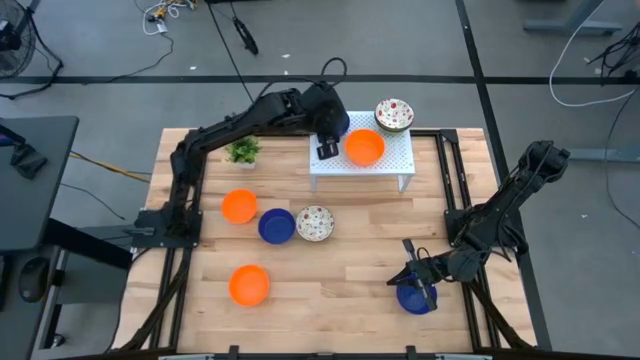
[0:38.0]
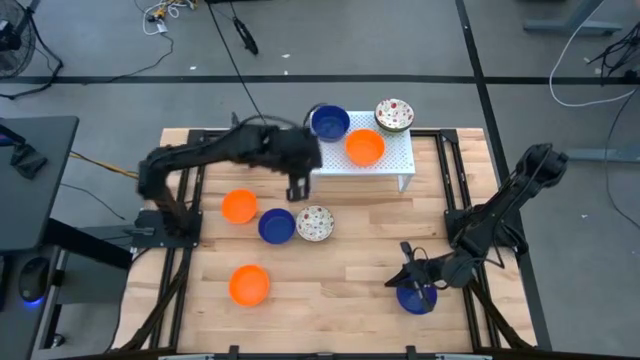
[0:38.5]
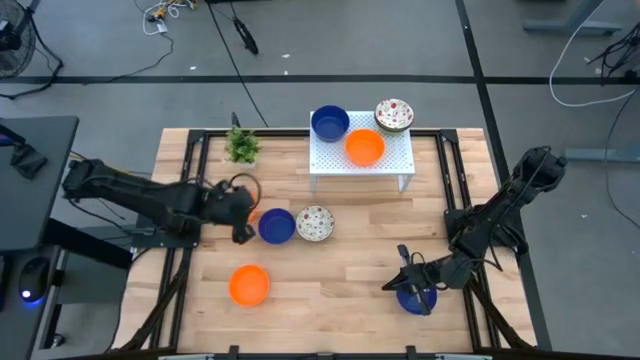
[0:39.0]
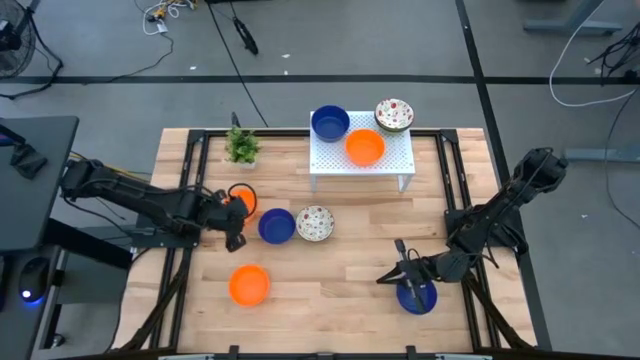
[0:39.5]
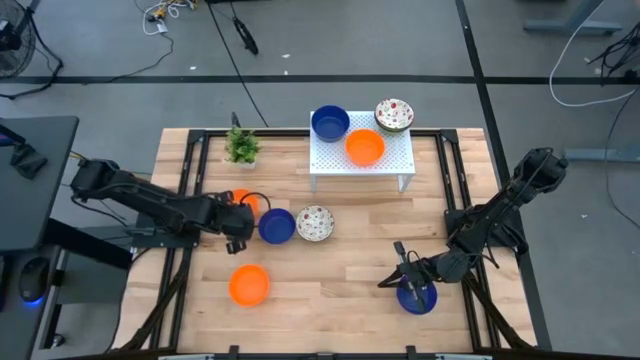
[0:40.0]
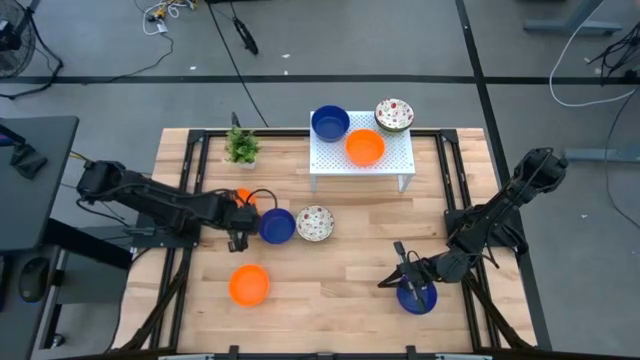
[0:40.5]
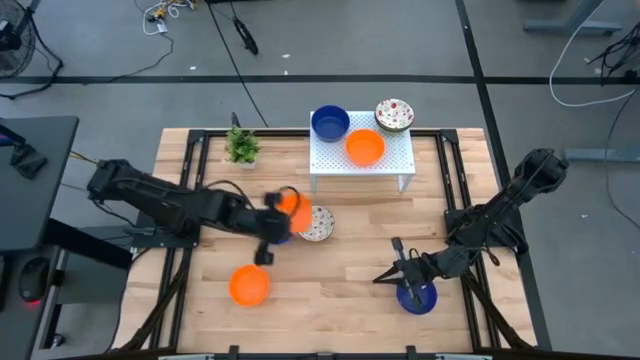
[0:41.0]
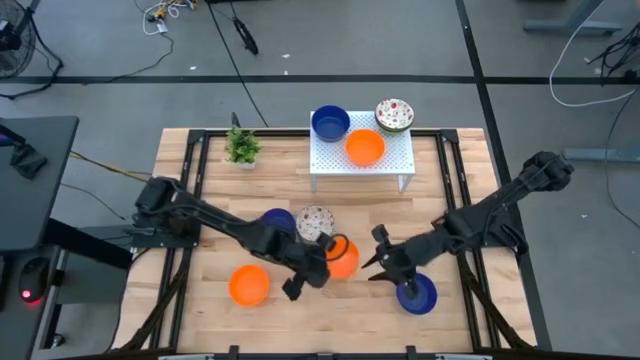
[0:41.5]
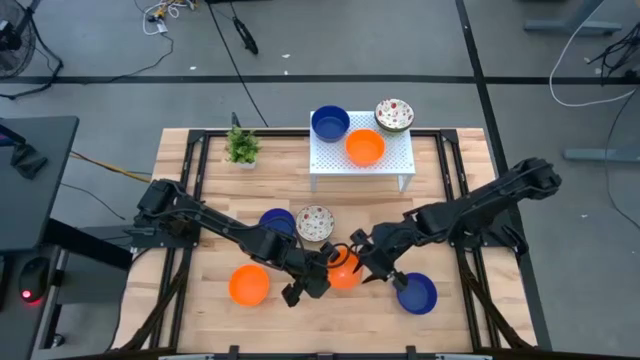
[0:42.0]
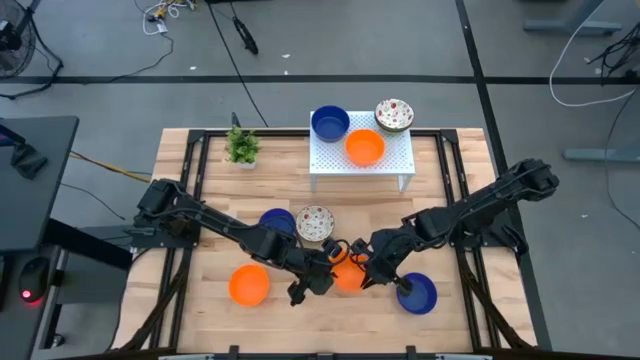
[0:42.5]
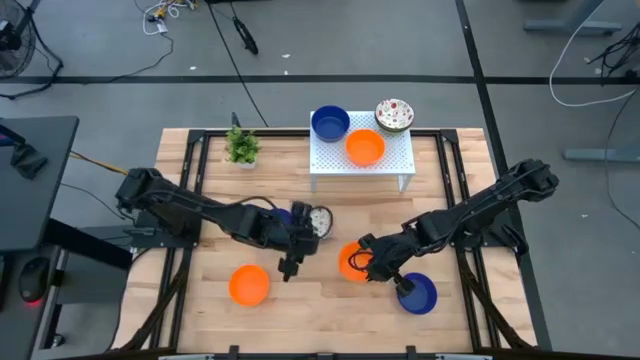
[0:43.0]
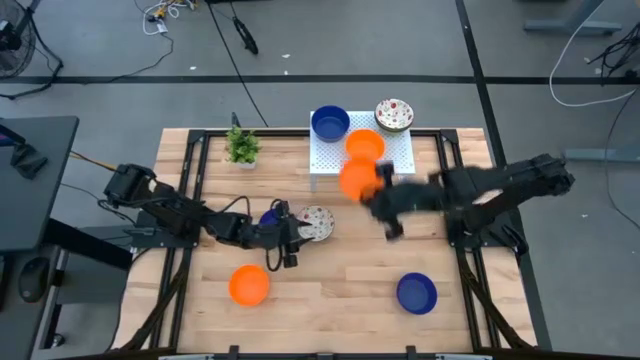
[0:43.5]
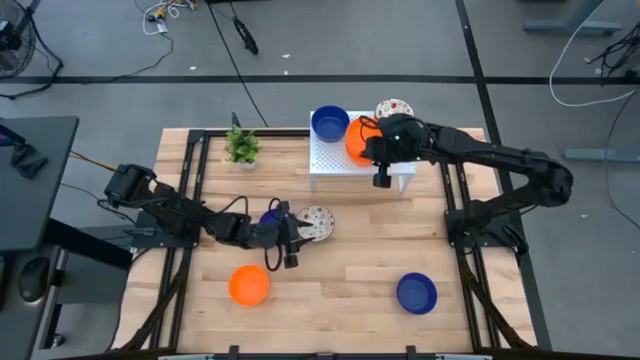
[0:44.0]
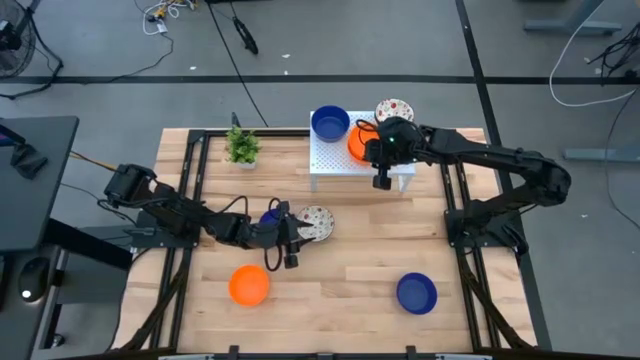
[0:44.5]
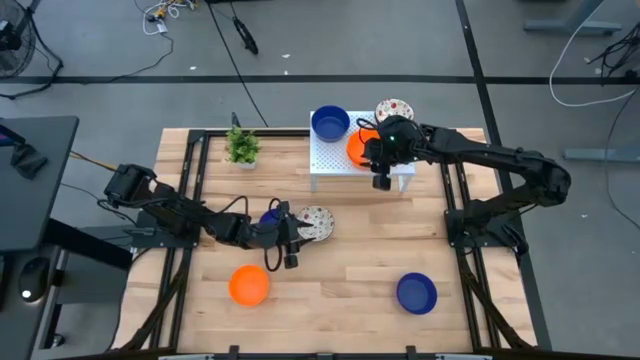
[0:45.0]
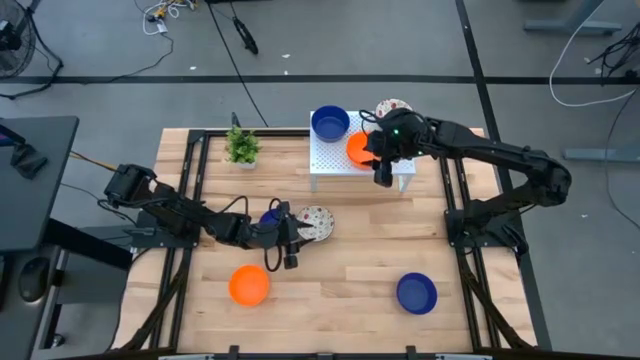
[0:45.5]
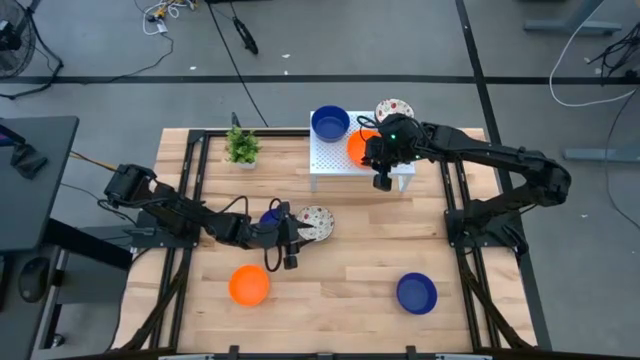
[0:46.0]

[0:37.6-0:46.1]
Task: Pick & Place Mini bowls
Stack the orange bowl on top of the other orange bowl on the shelf

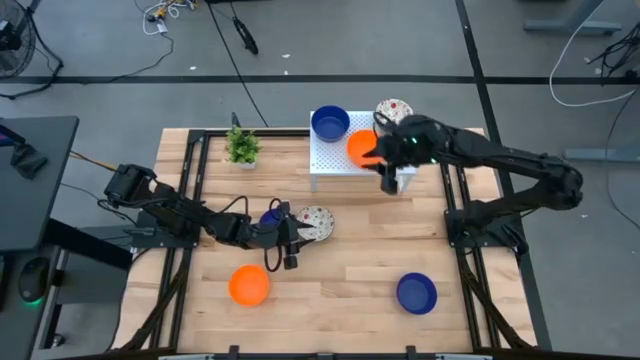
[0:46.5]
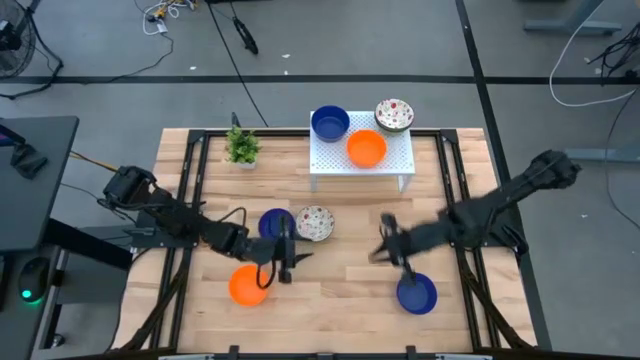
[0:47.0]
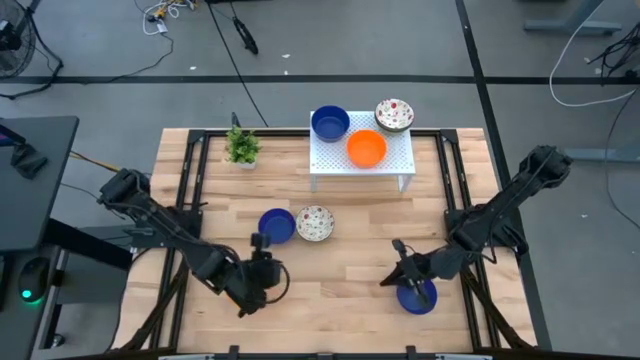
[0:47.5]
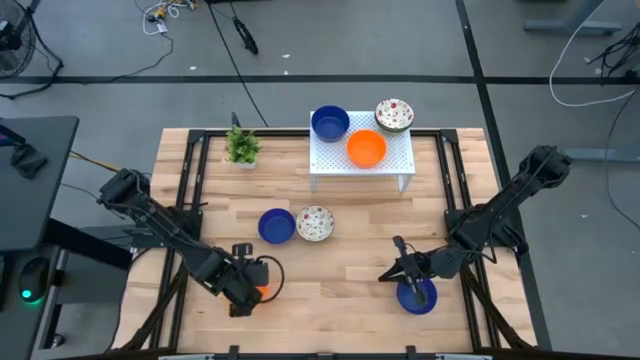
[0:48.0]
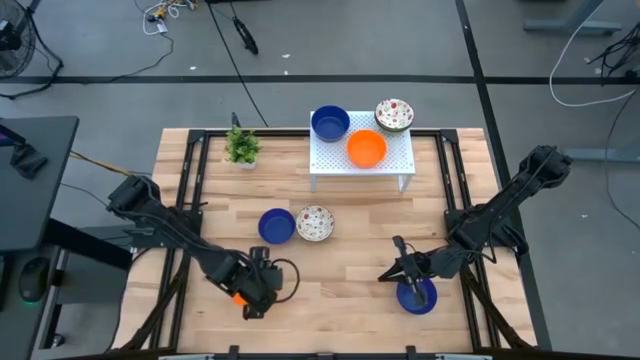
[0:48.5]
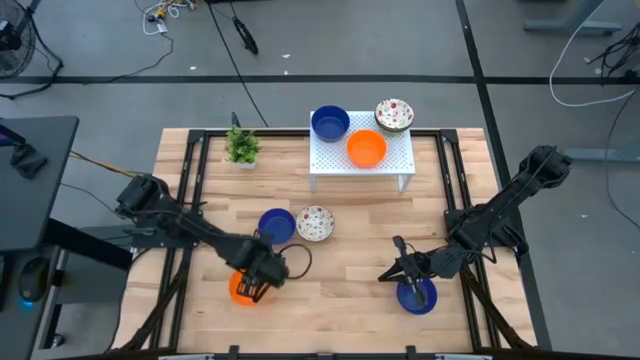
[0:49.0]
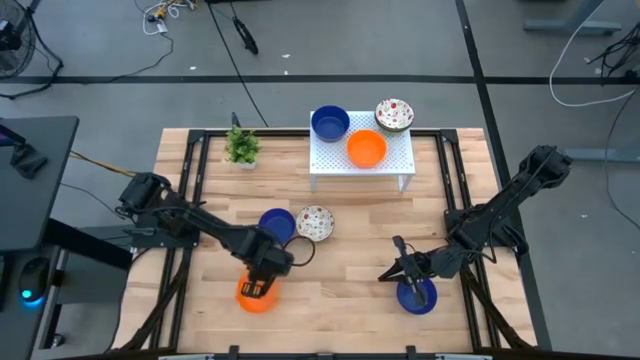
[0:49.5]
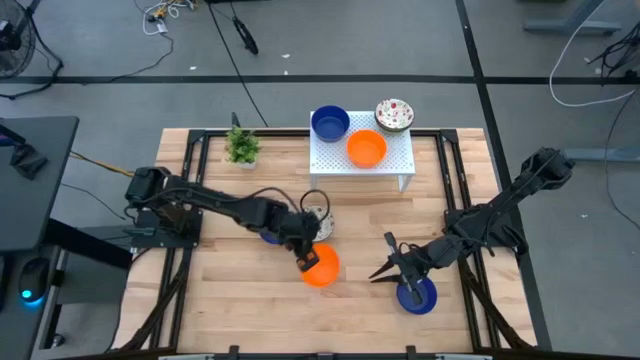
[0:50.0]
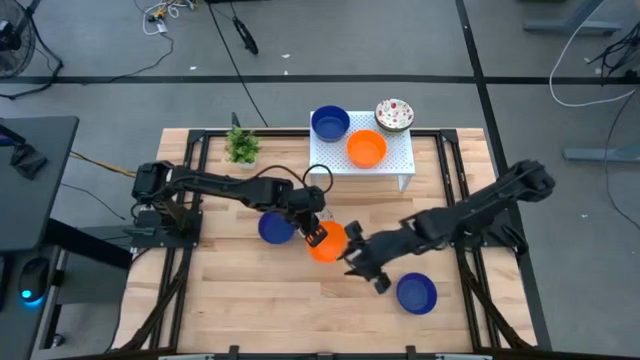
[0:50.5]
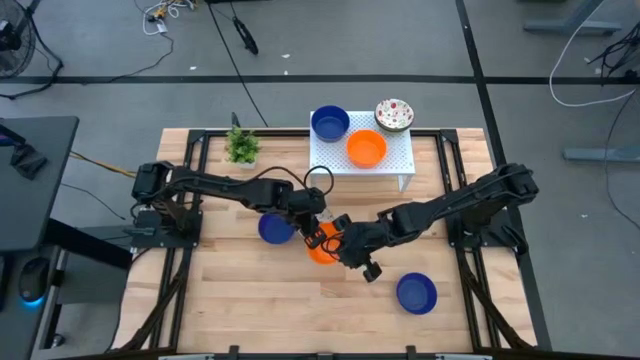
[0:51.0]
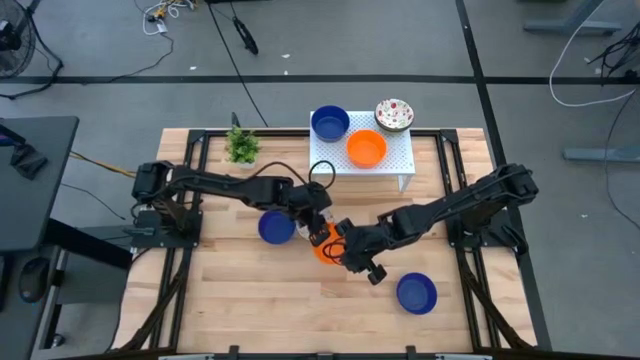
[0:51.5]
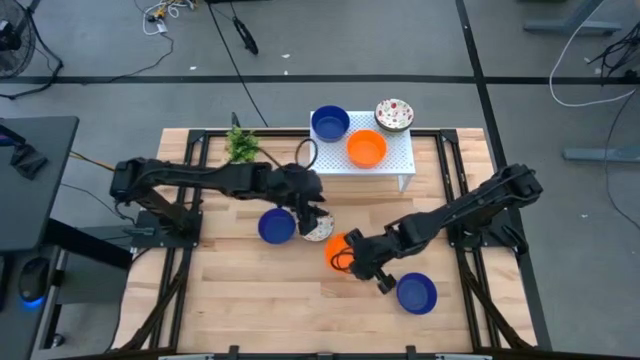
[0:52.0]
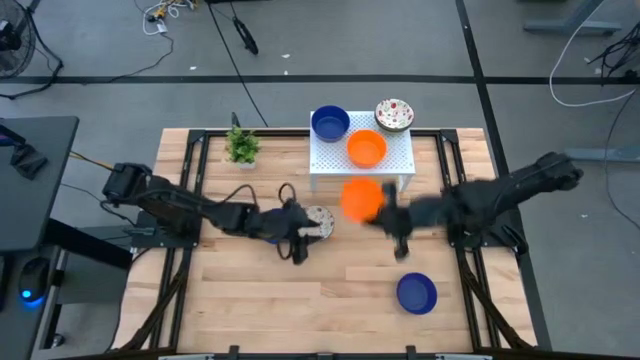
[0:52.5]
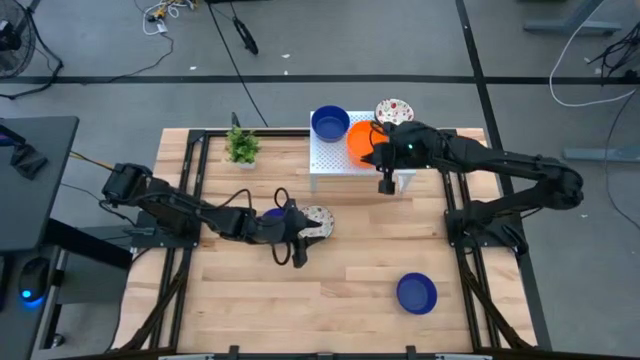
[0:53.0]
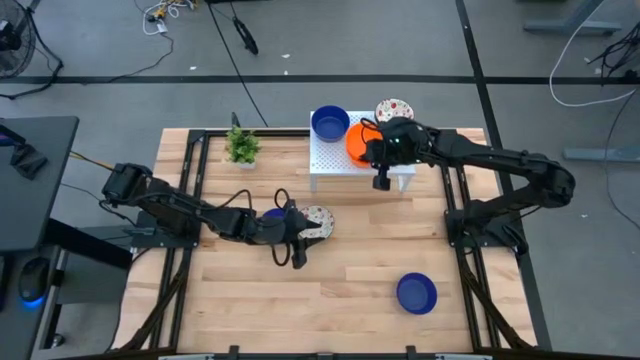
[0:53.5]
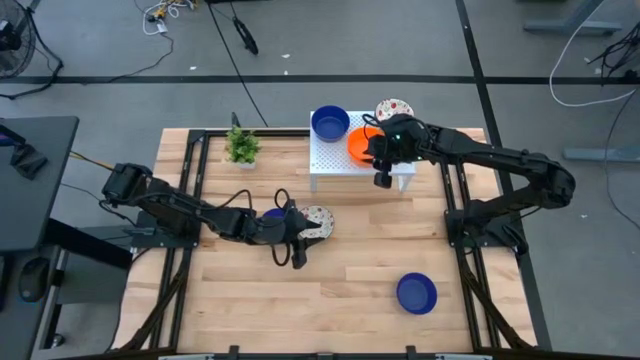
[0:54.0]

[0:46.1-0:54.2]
Stack the orange bowl on top of the other orange bowls on the shelf

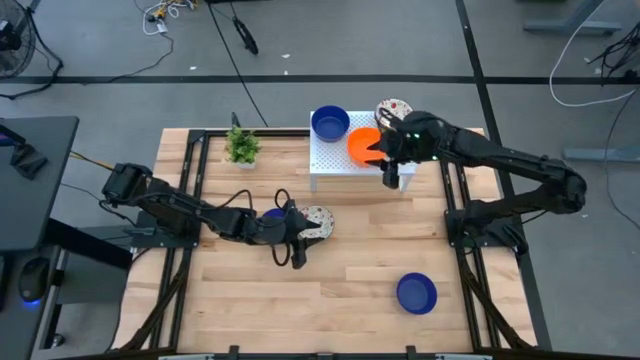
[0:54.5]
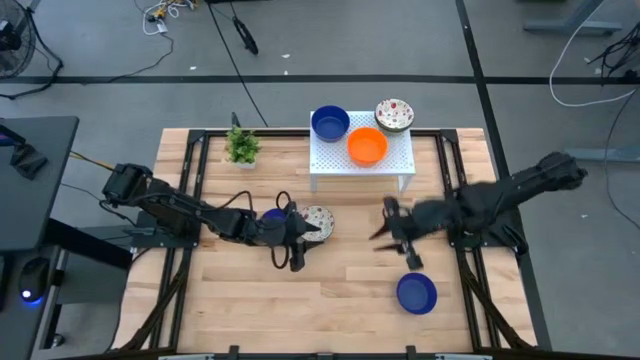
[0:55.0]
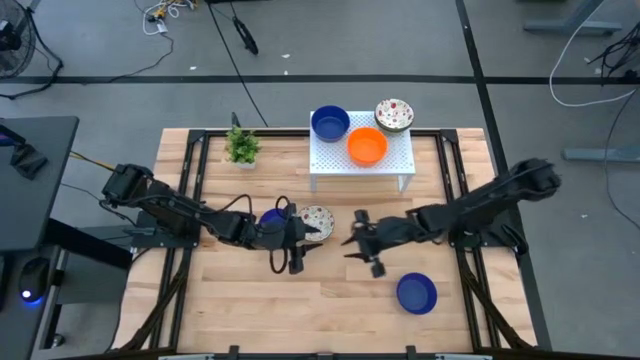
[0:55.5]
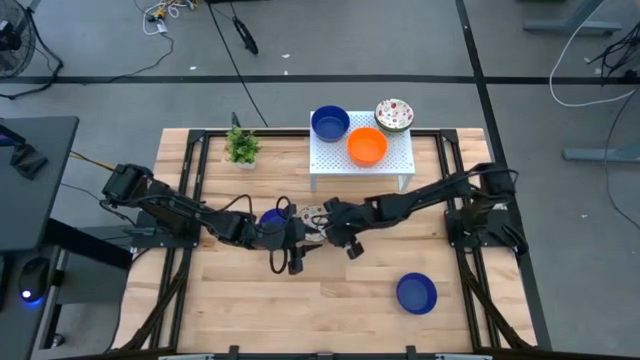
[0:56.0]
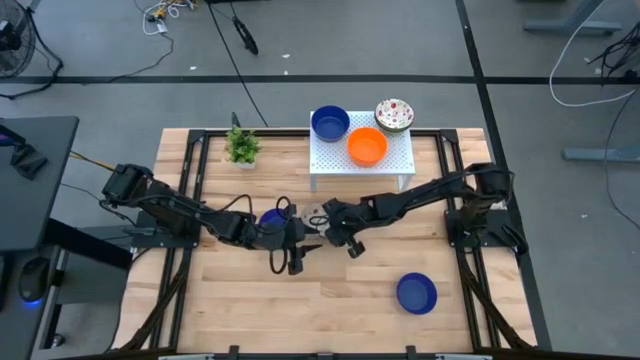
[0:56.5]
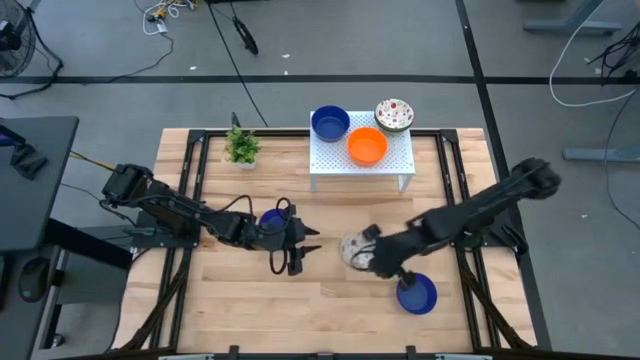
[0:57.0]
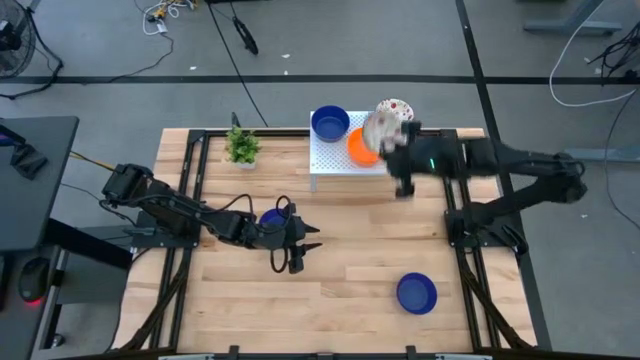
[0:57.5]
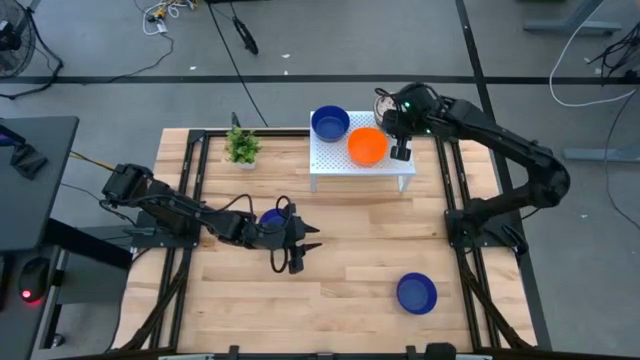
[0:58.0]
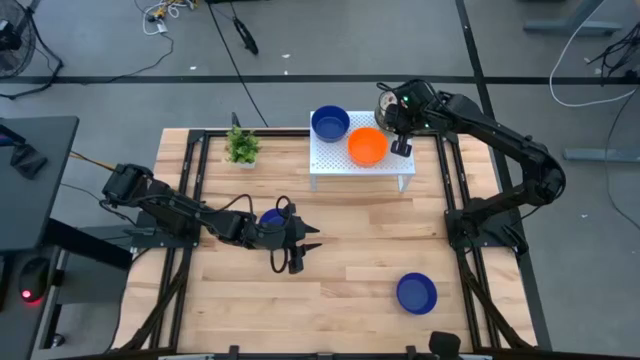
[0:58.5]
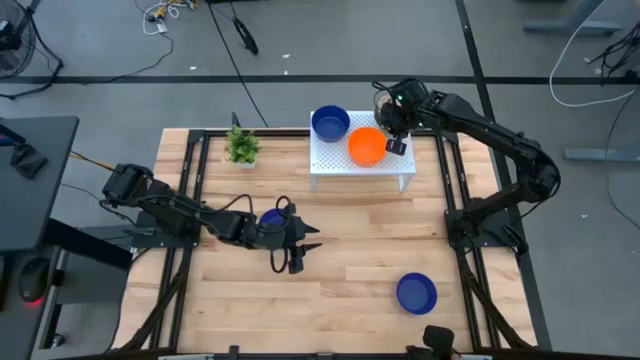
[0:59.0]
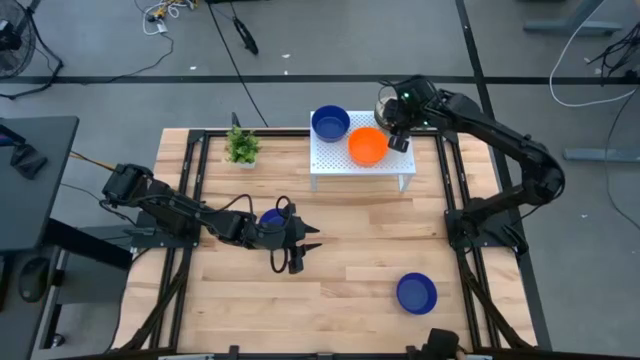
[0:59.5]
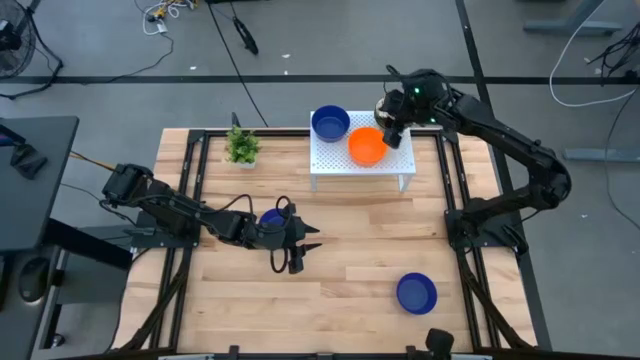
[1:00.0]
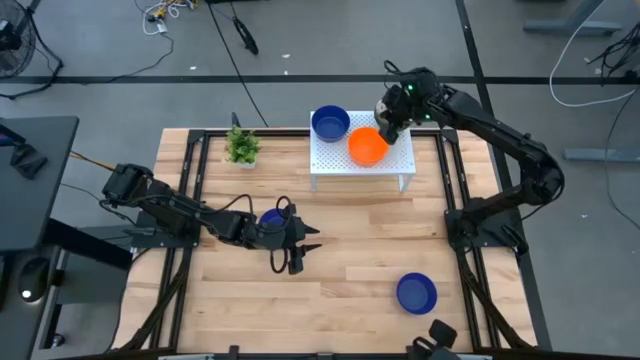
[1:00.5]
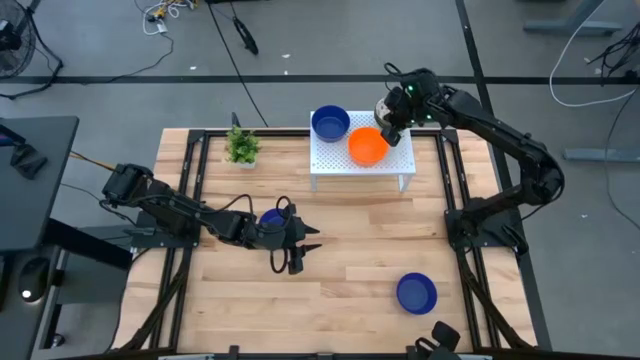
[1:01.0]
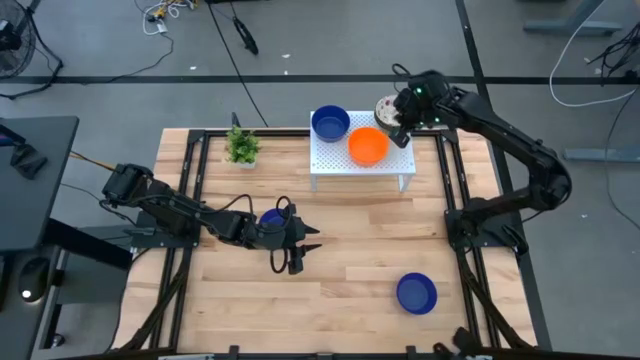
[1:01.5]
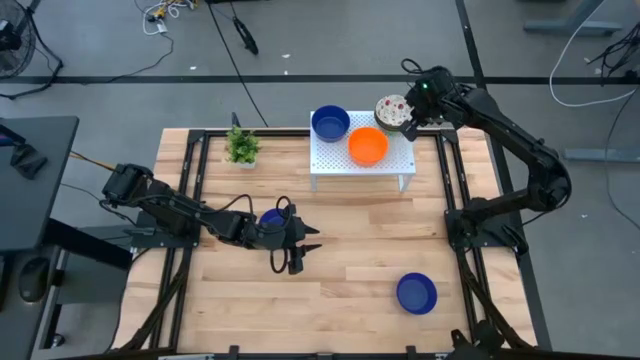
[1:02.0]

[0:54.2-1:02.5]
Stack the white red patterned bowl on top of the other white red patterned bowls on the shelf
